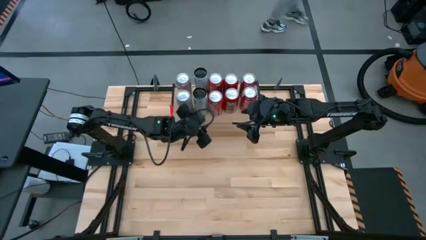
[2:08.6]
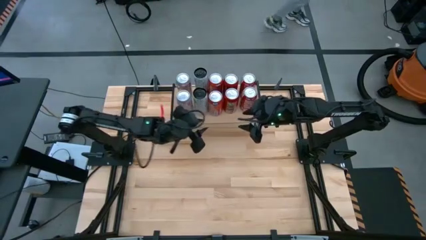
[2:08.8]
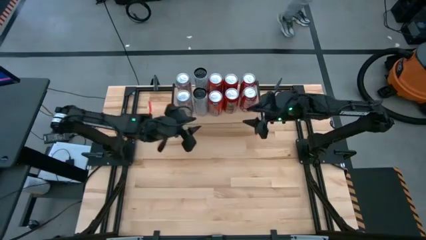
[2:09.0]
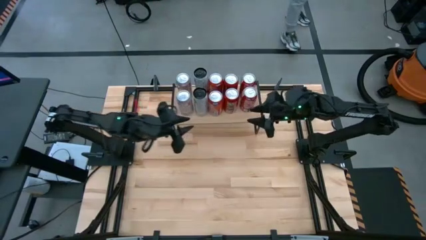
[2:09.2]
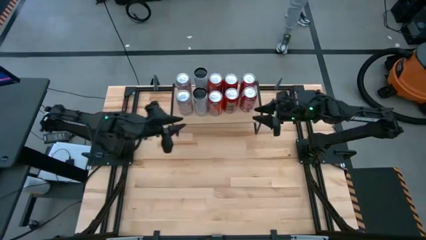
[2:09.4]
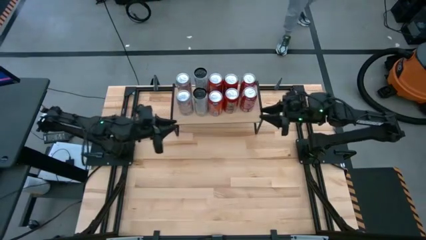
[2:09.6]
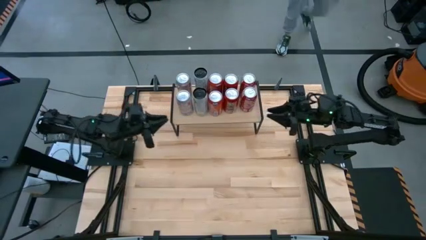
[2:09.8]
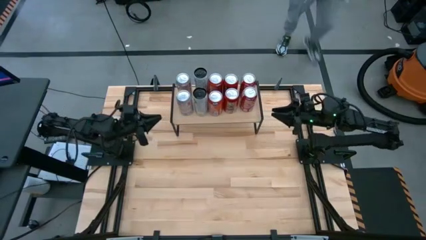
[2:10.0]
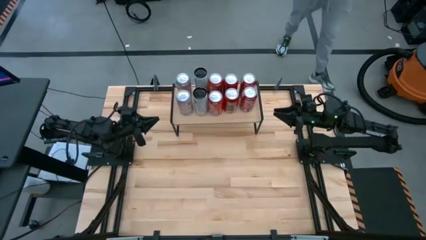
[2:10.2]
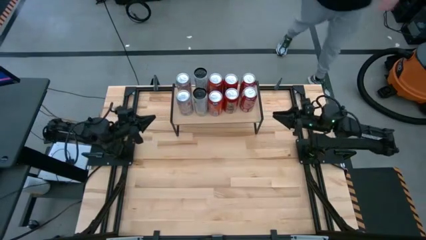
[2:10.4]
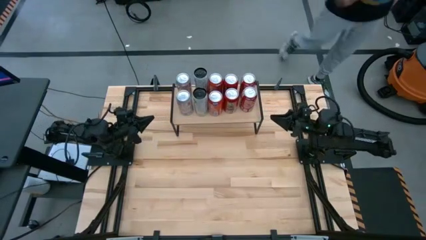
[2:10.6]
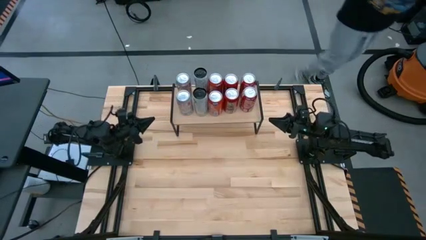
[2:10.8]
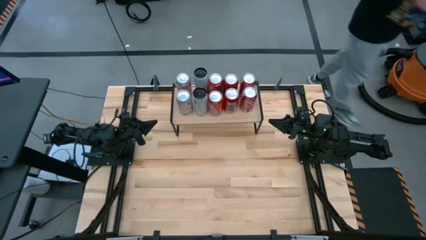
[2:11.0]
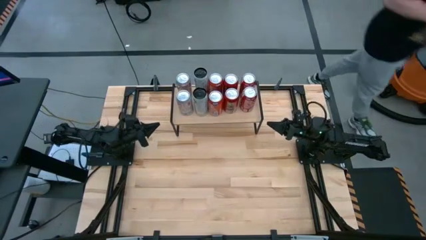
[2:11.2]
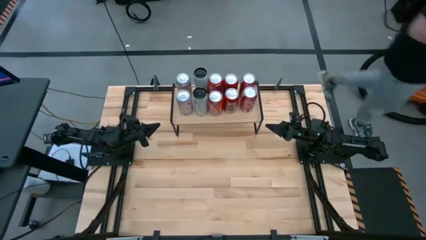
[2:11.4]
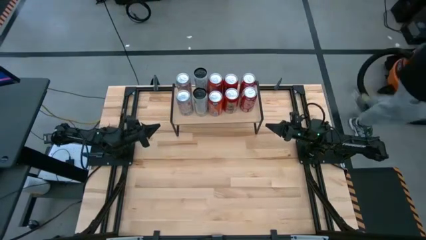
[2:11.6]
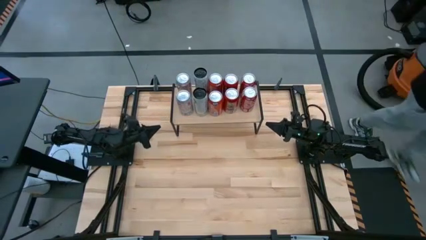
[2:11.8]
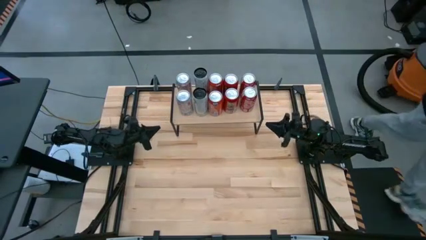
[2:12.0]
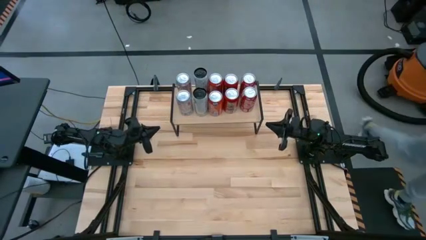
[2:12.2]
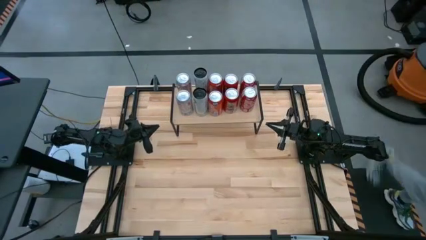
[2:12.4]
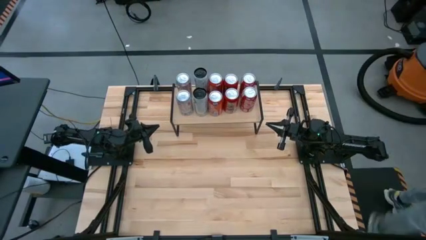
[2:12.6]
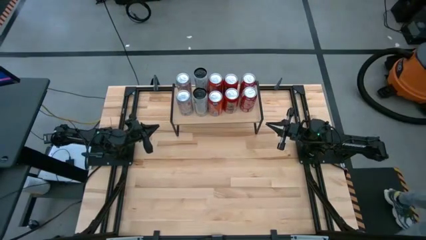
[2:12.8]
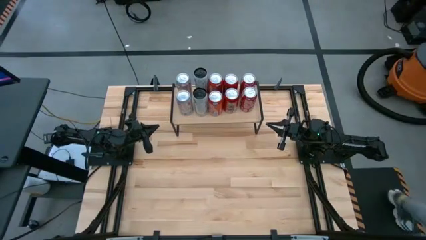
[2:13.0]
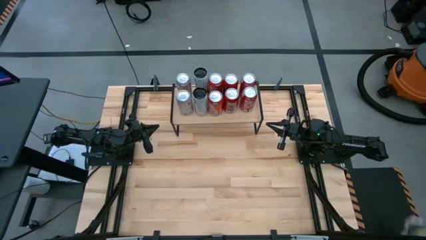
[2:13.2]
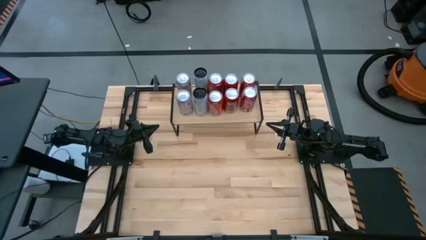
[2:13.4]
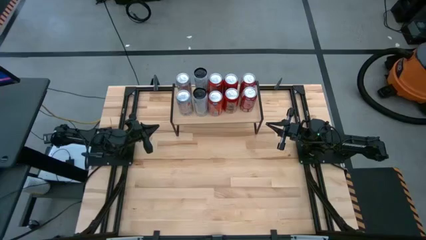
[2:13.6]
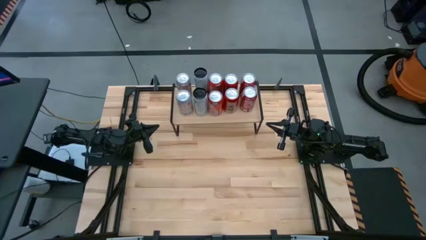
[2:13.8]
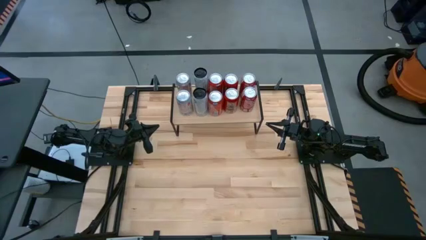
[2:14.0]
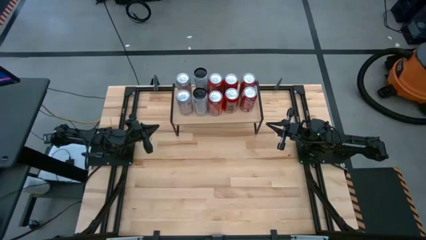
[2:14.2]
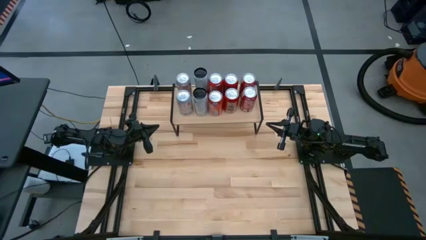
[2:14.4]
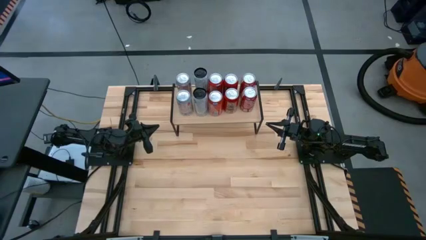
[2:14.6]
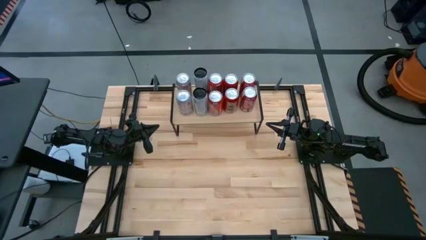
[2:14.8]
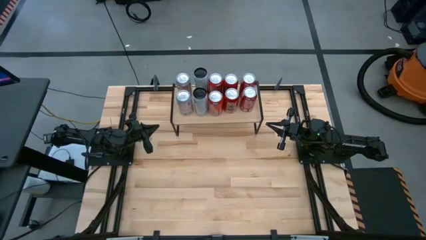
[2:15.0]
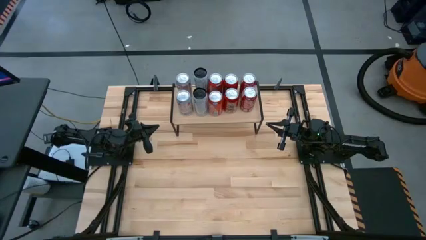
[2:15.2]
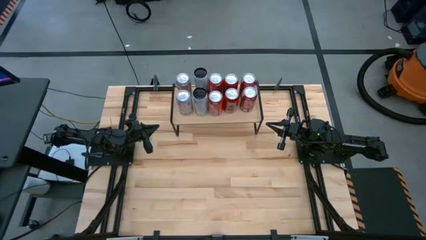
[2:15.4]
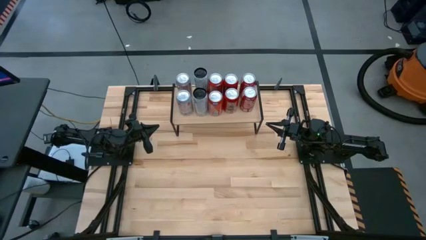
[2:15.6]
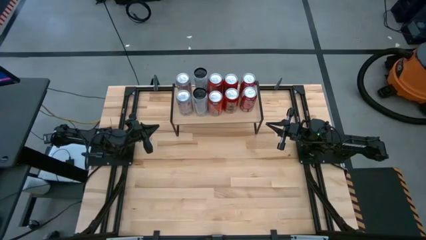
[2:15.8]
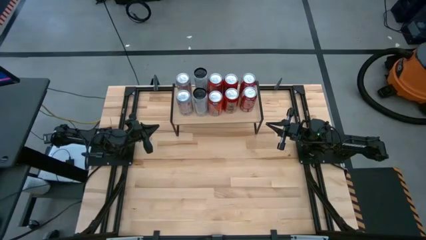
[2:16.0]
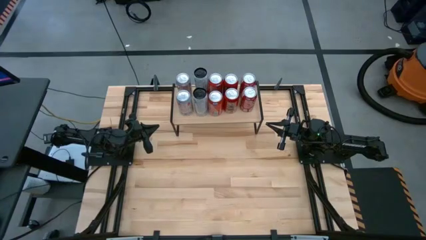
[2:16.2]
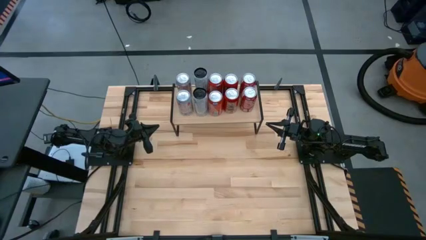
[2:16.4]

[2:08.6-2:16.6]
Task: Place canned beverage on shelf
Return to Home Position

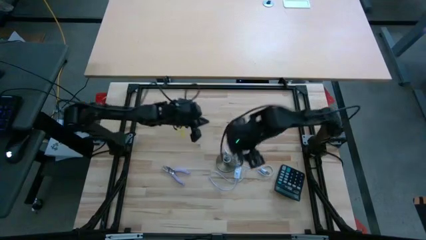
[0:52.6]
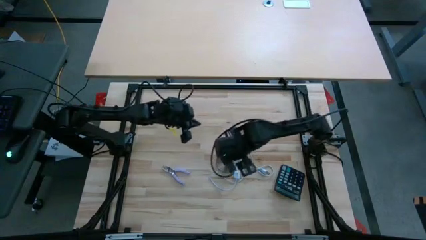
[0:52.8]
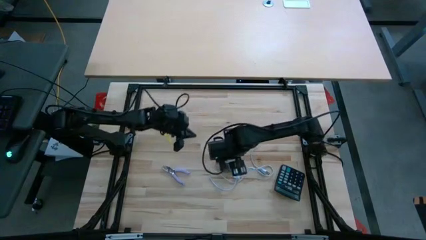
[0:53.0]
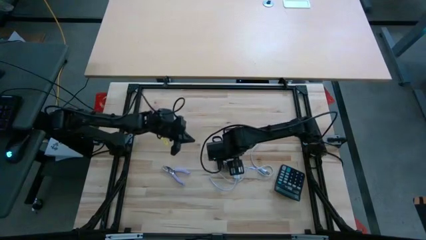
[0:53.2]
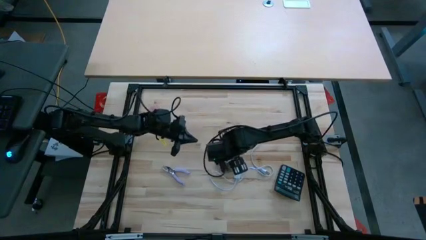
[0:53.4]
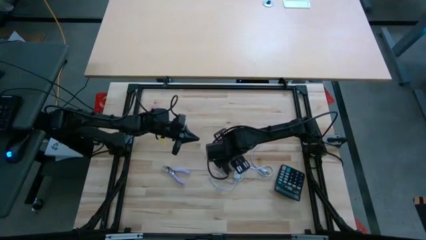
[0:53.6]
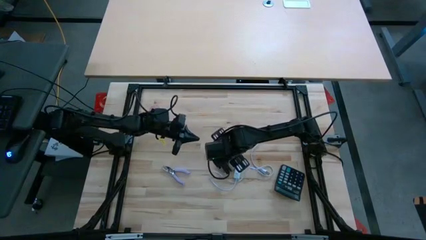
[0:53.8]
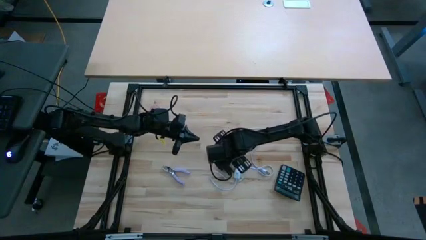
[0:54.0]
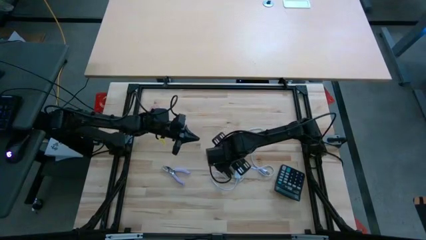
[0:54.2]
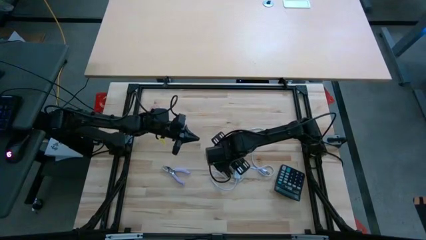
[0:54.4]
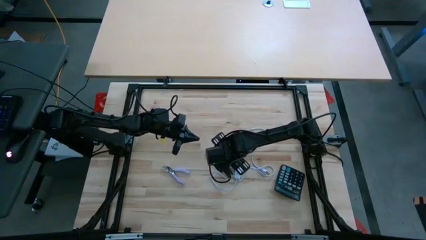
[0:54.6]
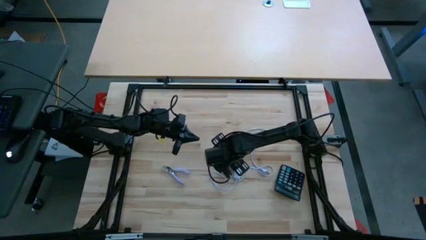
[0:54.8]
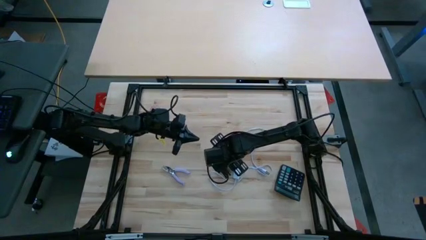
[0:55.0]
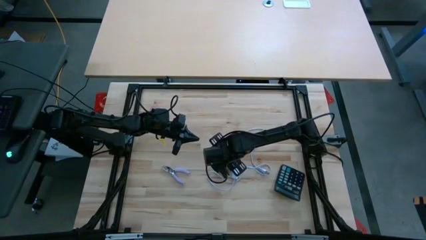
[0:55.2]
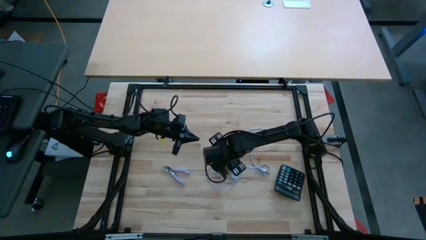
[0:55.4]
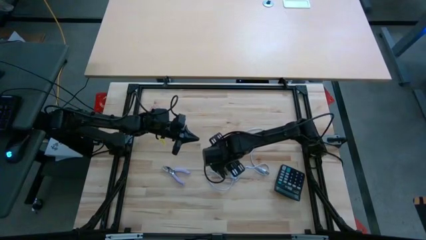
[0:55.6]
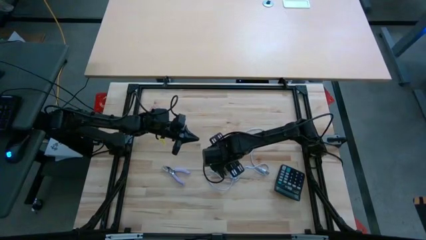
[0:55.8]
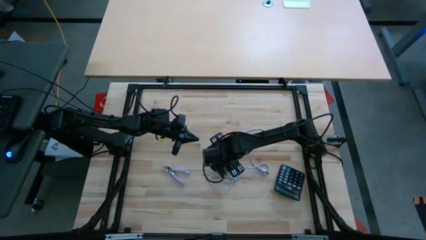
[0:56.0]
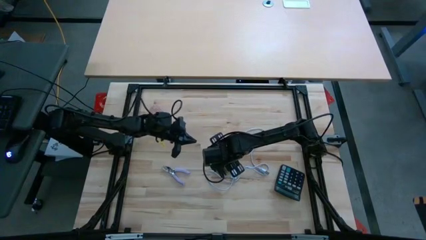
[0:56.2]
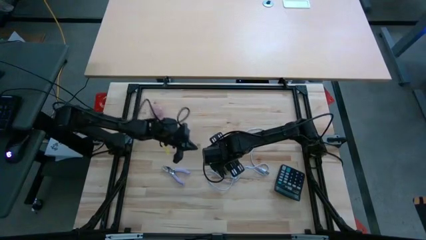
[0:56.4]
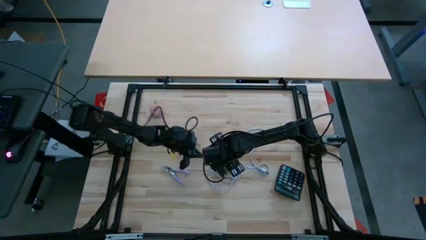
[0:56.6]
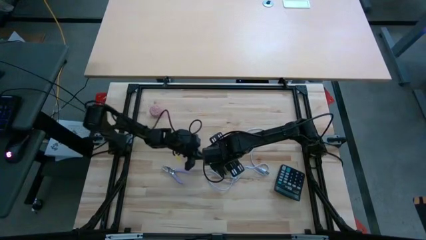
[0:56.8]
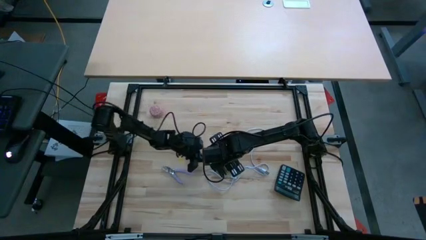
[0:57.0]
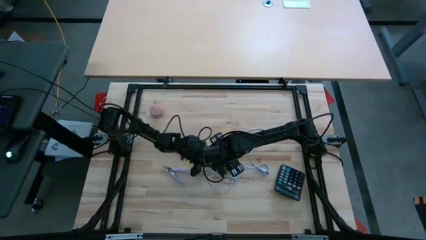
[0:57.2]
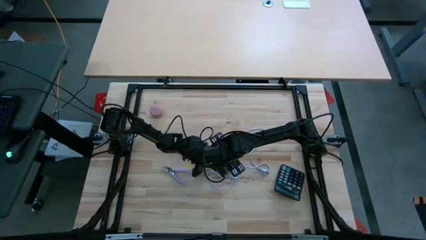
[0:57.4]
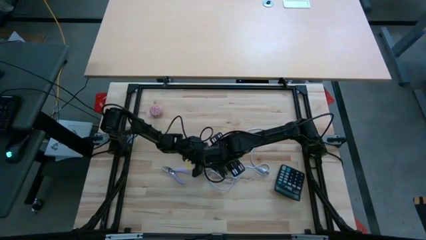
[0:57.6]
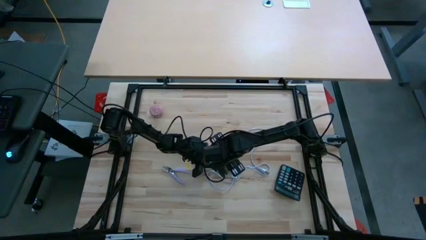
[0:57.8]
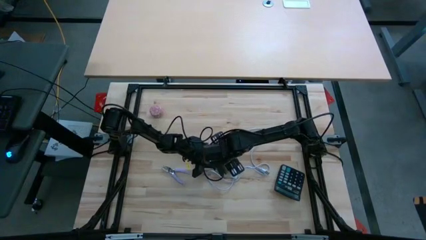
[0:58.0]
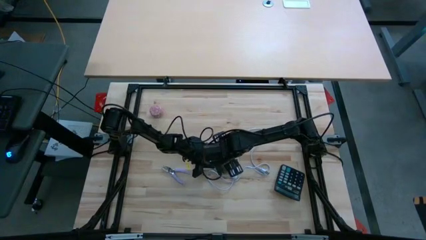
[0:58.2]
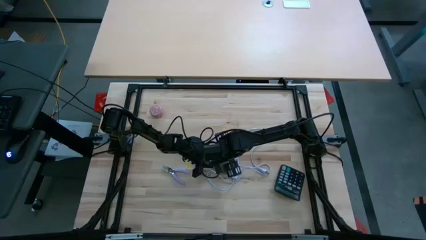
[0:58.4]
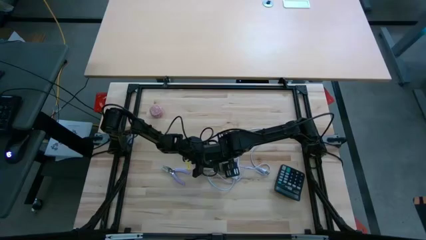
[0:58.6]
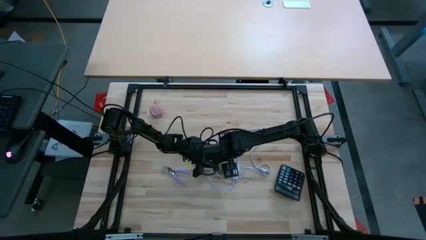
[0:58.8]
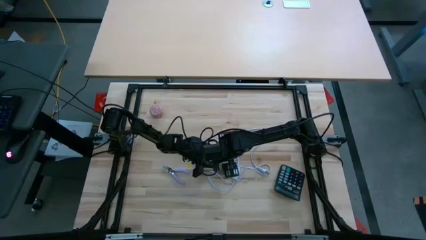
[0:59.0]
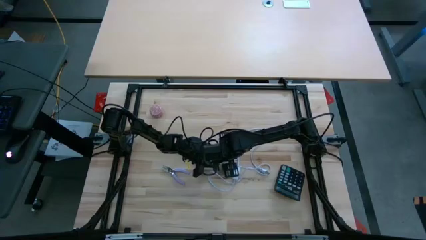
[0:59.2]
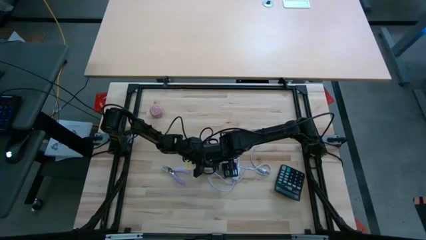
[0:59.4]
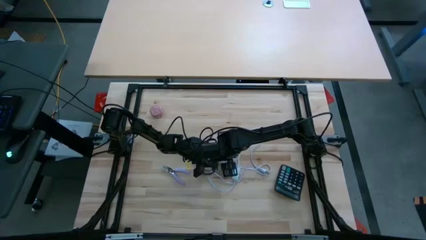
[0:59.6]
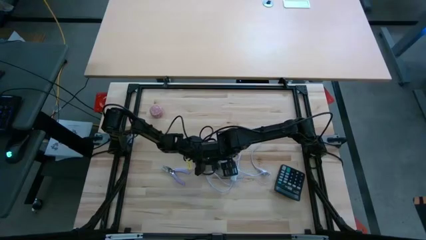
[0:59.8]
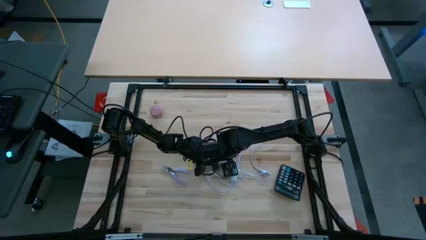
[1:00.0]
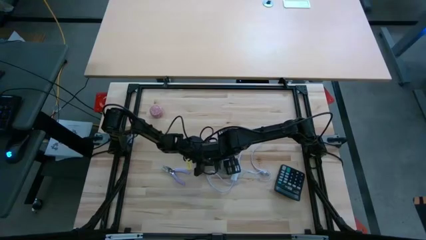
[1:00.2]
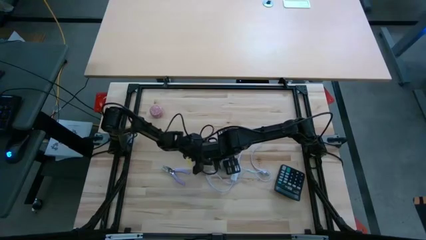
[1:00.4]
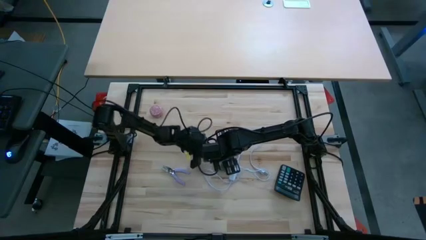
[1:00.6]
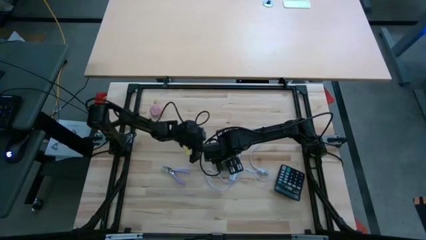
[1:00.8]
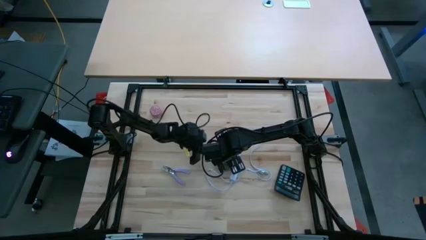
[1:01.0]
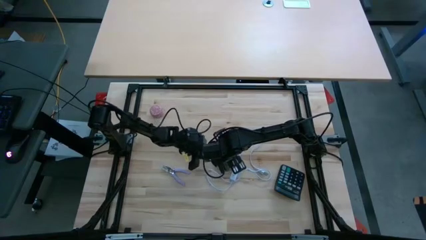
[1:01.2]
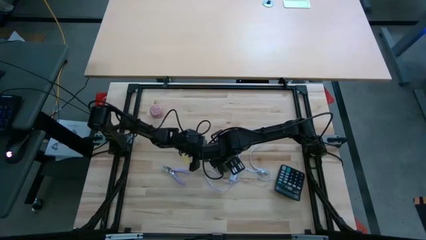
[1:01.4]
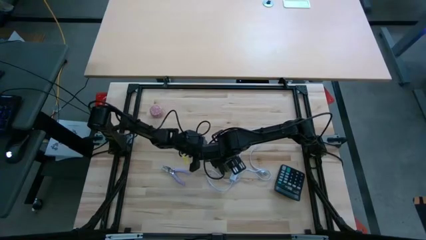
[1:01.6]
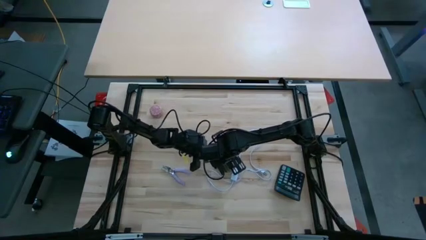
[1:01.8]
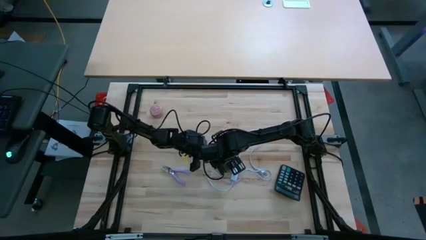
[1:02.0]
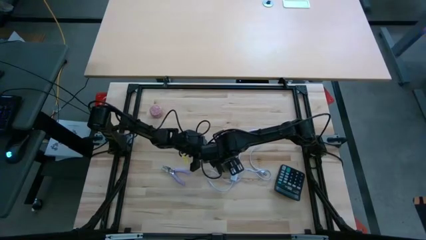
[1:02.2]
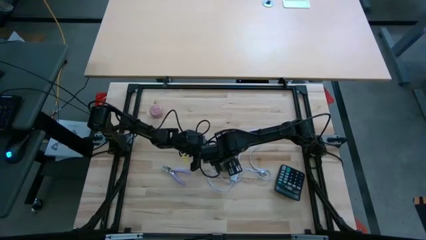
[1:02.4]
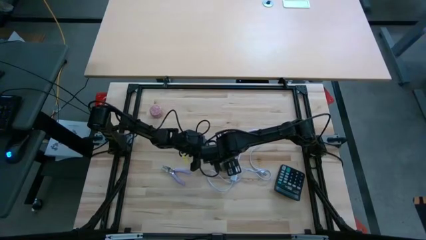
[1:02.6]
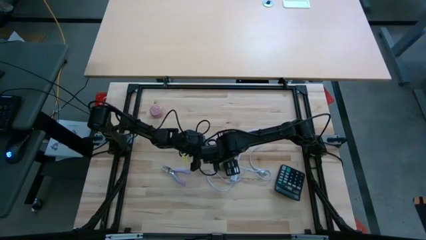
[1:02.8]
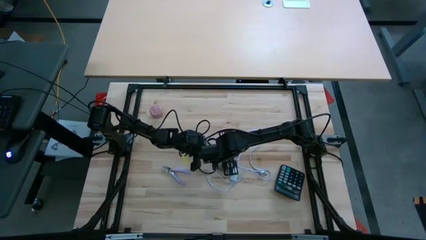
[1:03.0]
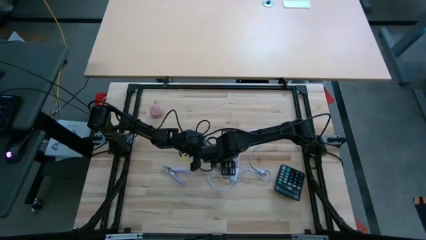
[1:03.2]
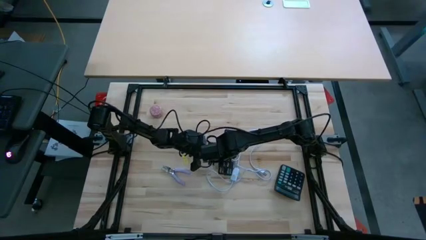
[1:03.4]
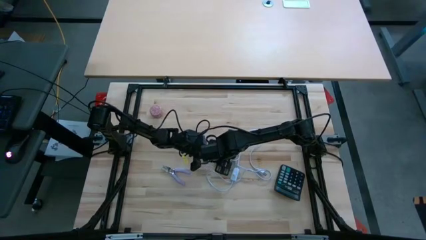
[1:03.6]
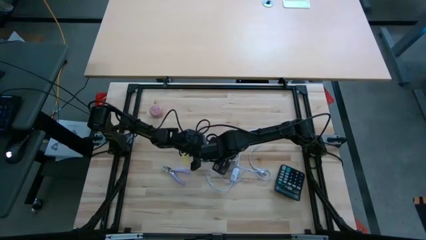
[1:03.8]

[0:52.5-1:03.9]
Task: Screw lightbulb
Insert the lightbulb into the lamp
